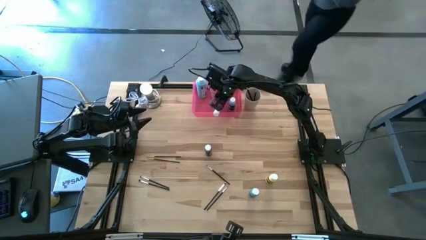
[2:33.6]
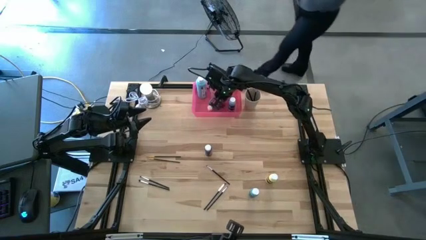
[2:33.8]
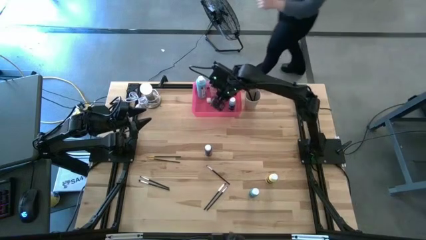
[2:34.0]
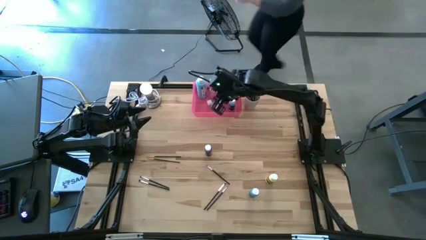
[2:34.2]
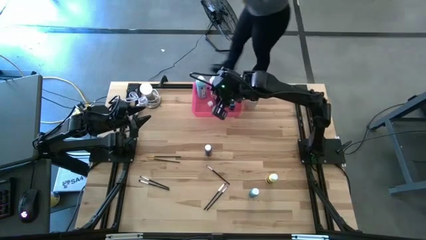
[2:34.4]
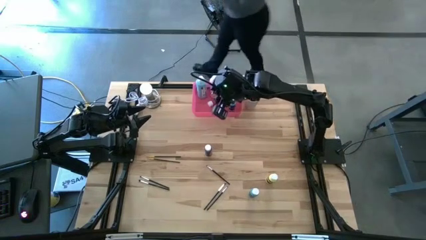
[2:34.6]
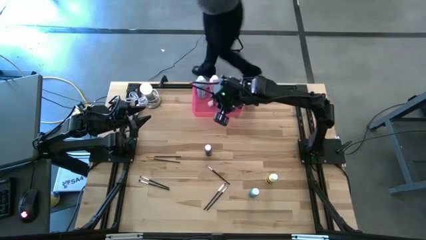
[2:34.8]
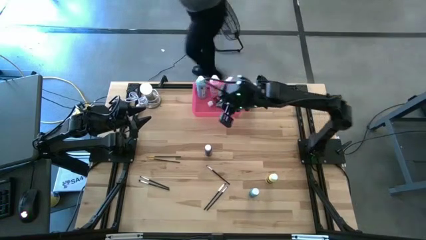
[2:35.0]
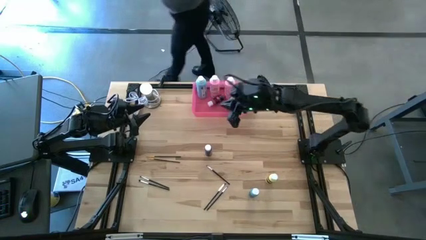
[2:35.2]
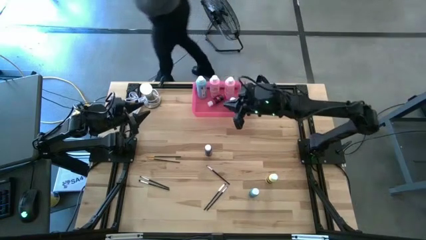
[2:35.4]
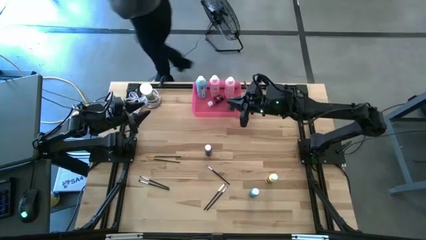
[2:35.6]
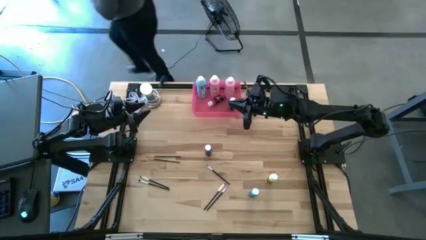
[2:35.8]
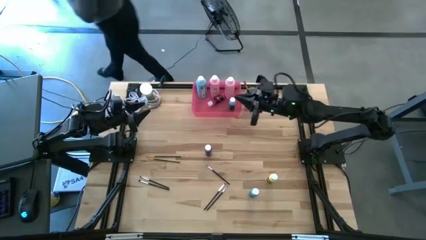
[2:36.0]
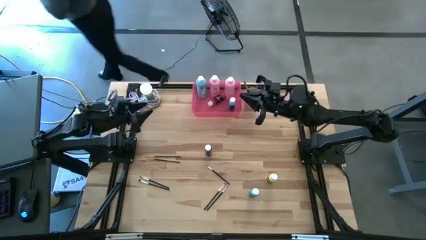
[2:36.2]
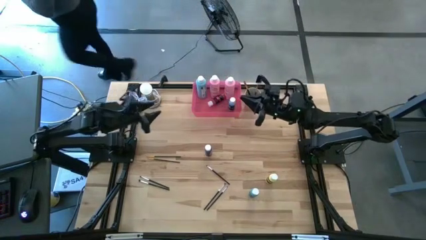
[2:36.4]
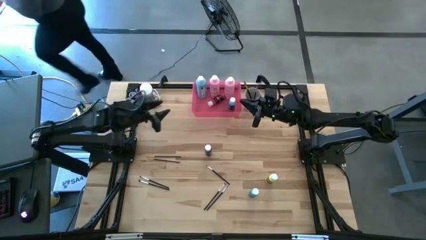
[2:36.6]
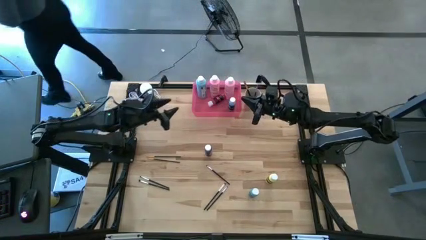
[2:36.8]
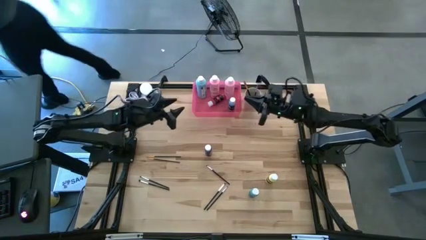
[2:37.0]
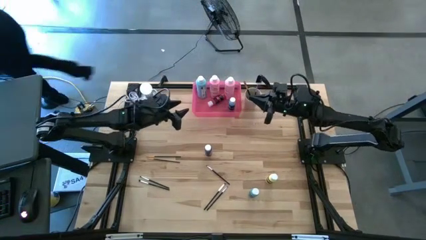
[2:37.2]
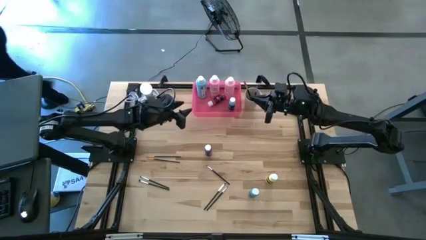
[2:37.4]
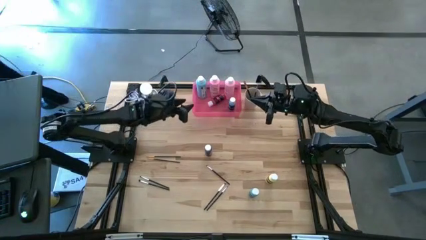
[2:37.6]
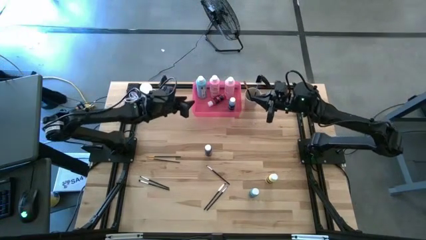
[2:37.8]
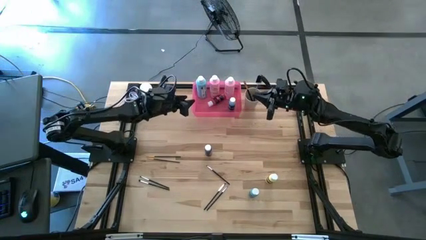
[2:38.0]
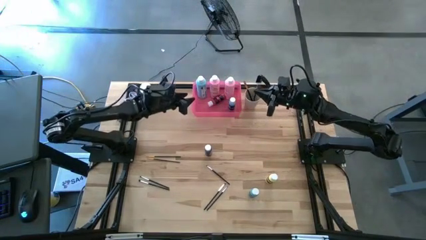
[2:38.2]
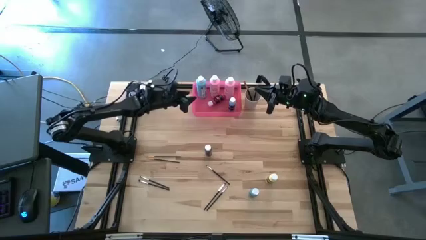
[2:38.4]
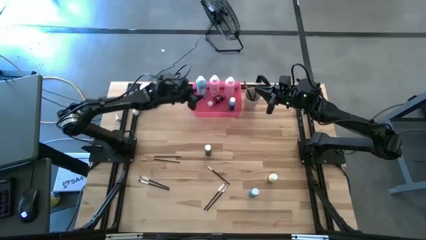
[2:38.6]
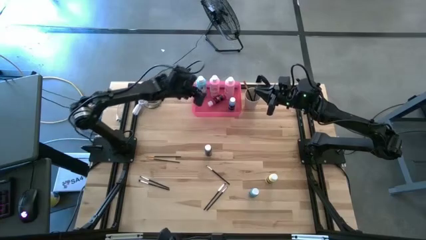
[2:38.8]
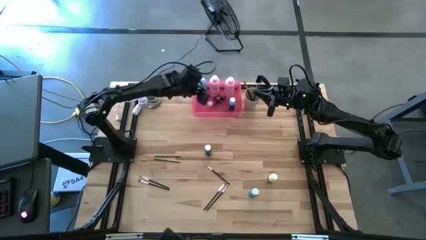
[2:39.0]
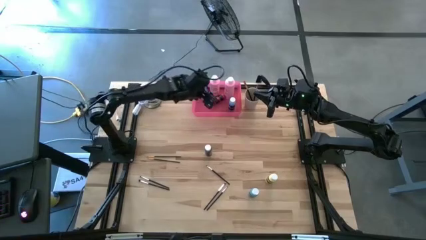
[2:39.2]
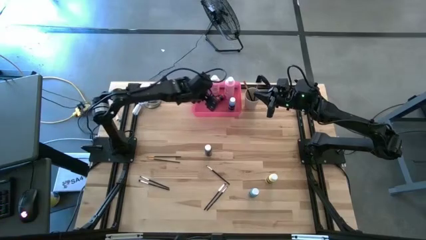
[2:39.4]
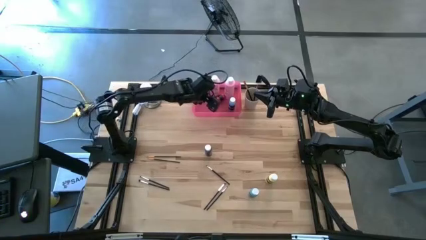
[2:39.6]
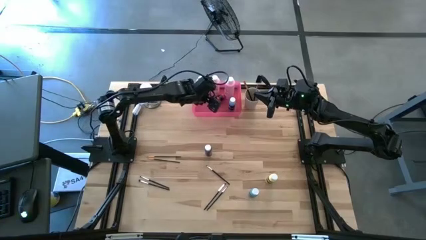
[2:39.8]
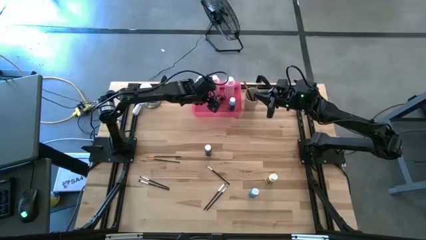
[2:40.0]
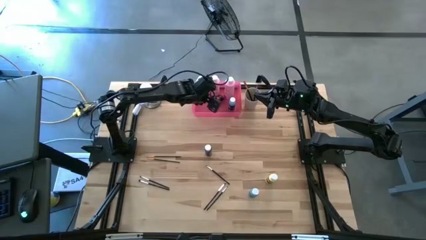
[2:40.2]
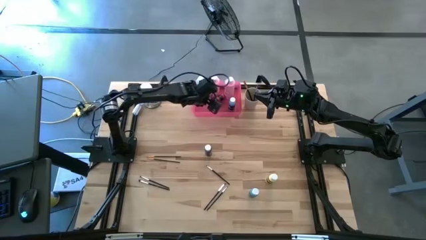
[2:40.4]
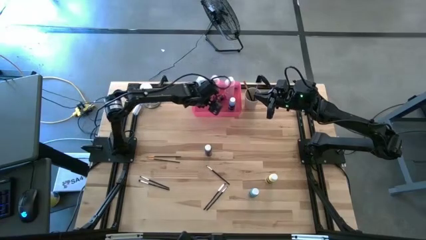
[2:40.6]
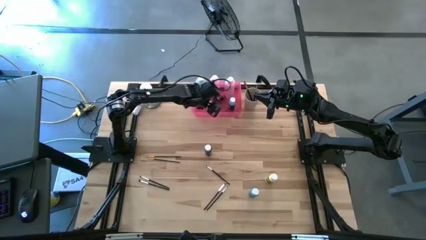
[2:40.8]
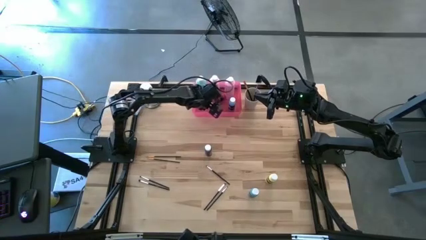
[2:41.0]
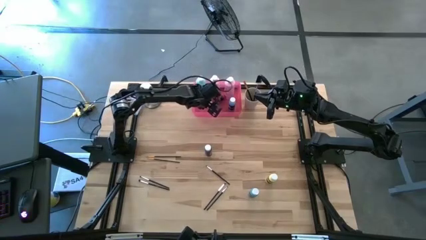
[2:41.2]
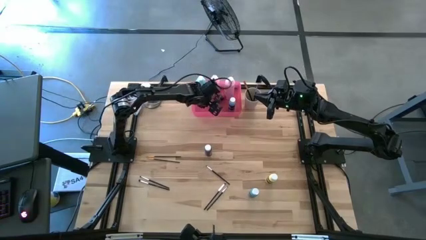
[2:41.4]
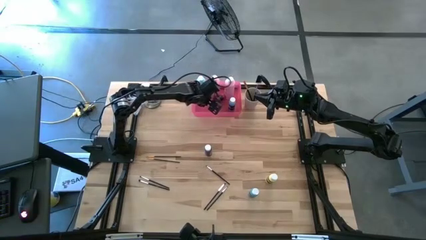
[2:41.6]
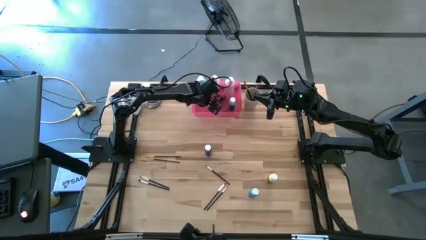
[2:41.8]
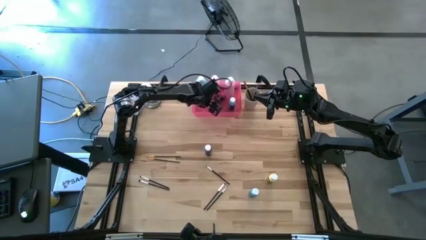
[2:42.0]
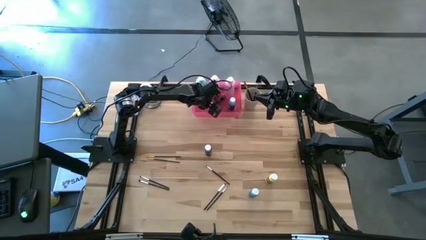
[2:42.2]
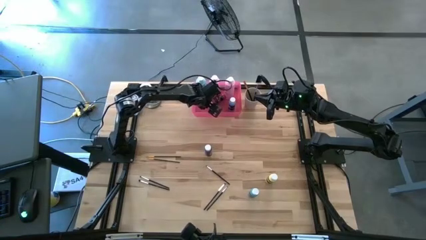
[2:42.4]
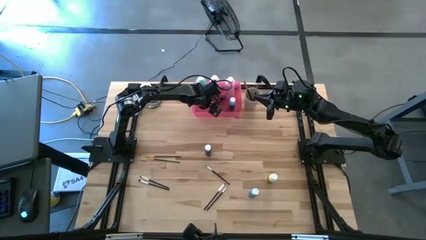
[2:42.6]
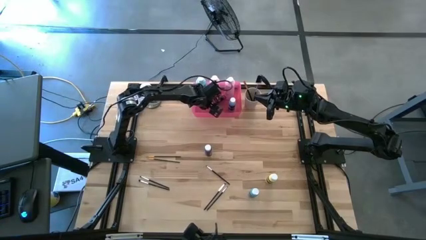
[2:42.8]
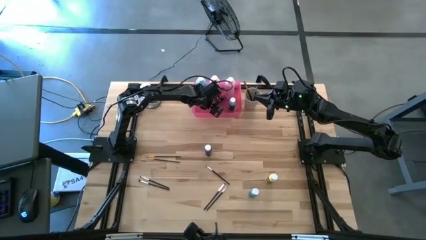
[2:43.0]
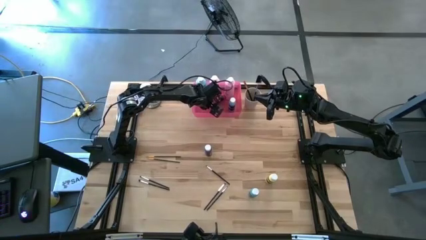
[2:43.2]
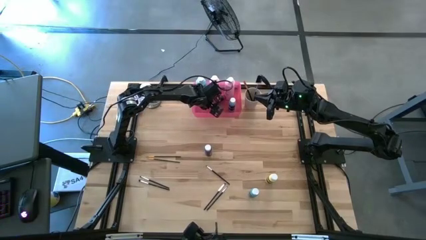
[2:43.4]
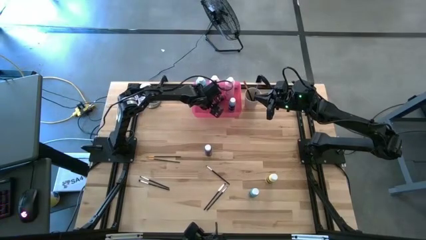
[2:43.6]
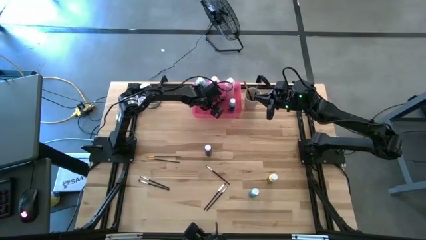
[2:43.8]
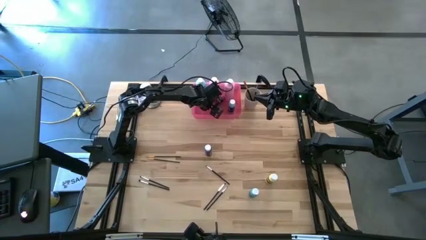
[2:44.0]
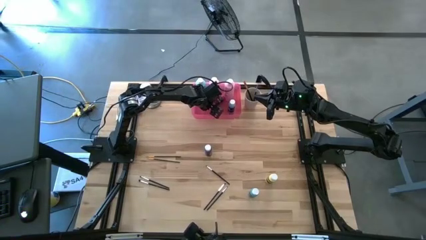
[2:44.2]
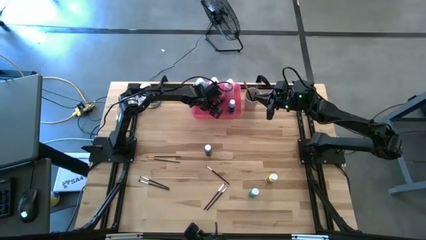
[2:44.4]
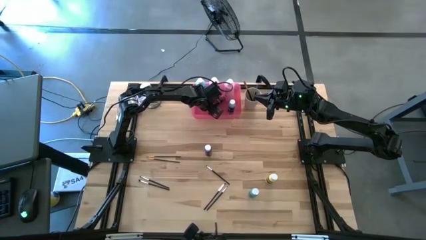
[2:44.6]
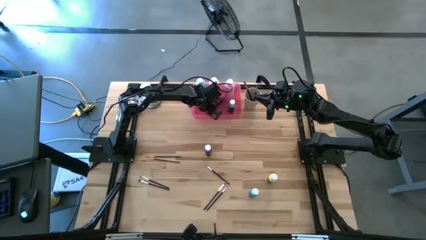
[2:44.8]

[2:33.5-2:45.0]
Task: Pick & Place Paint Supplies
Put the small pink paint bottle into the pink bin
